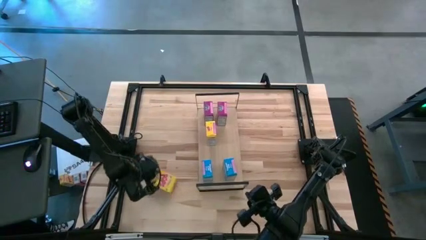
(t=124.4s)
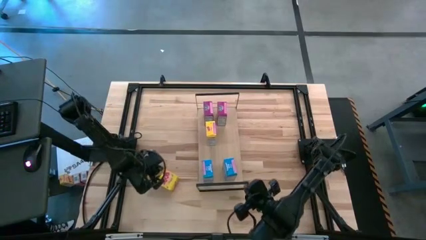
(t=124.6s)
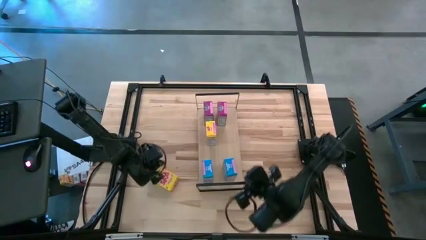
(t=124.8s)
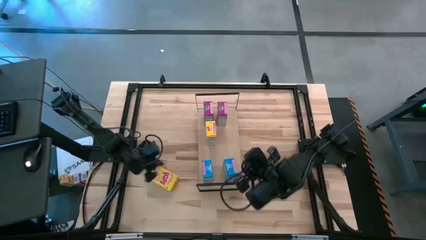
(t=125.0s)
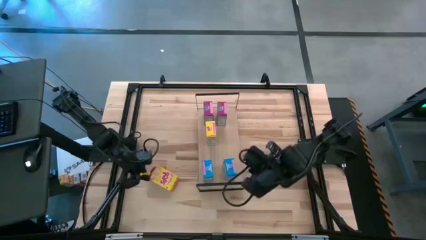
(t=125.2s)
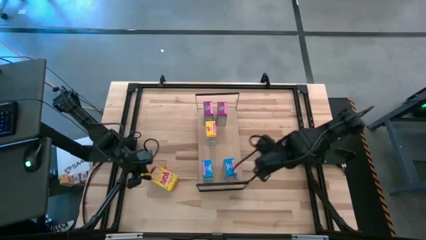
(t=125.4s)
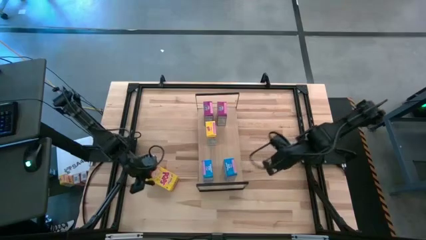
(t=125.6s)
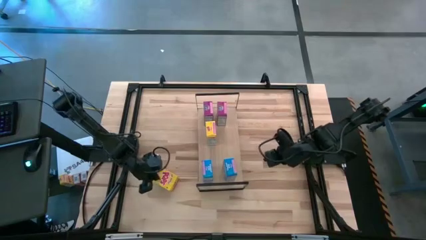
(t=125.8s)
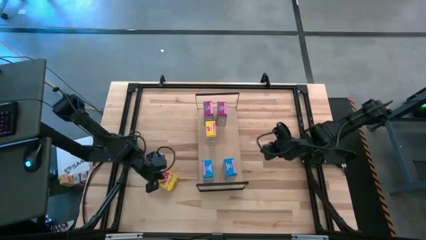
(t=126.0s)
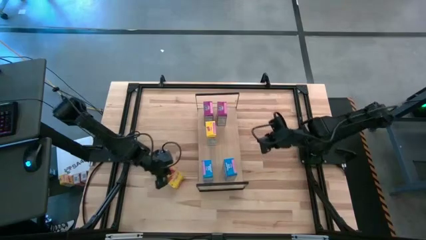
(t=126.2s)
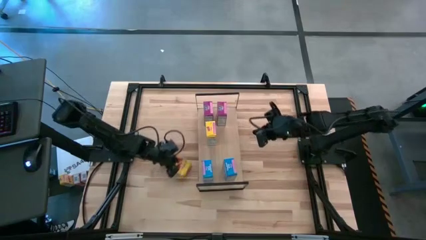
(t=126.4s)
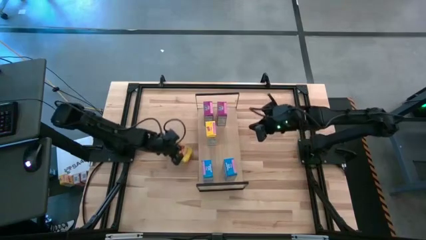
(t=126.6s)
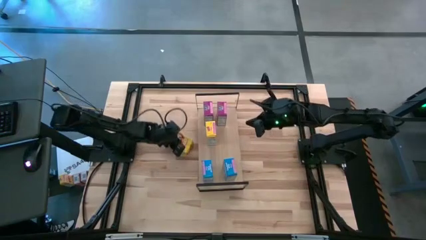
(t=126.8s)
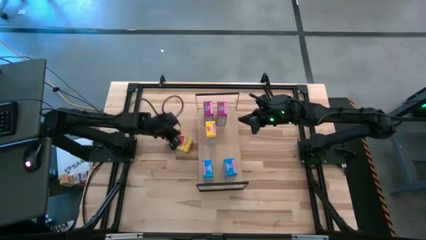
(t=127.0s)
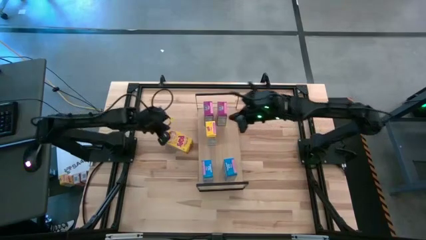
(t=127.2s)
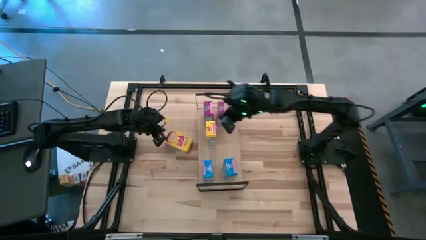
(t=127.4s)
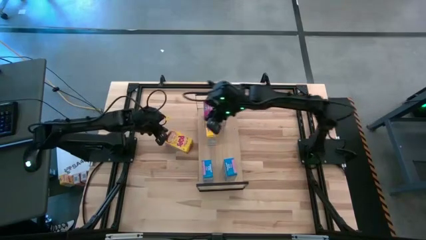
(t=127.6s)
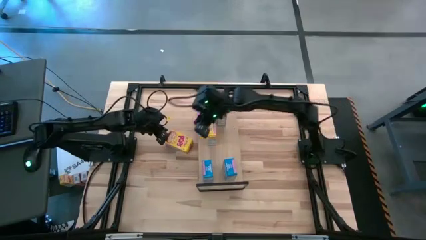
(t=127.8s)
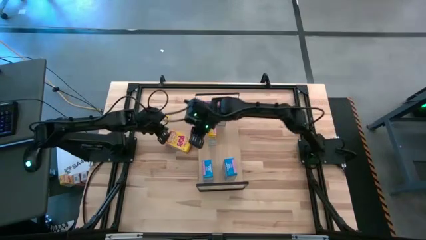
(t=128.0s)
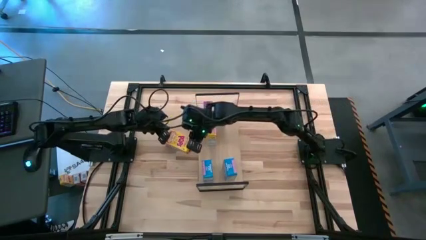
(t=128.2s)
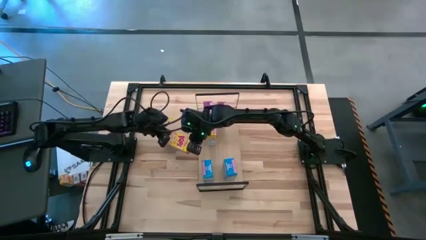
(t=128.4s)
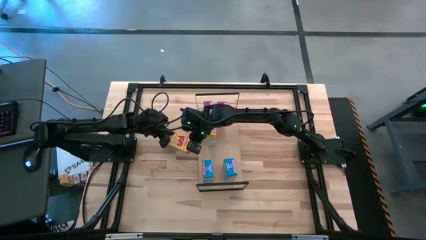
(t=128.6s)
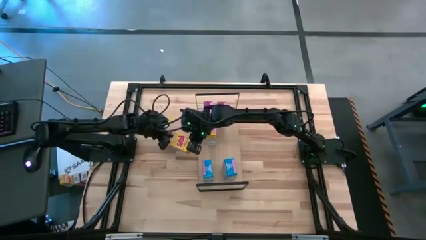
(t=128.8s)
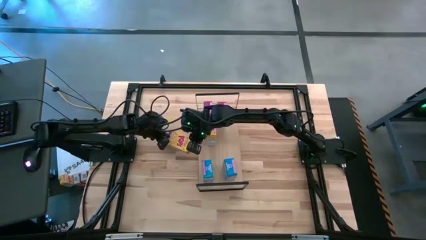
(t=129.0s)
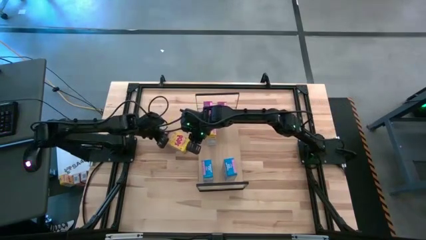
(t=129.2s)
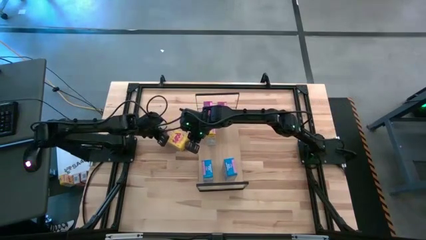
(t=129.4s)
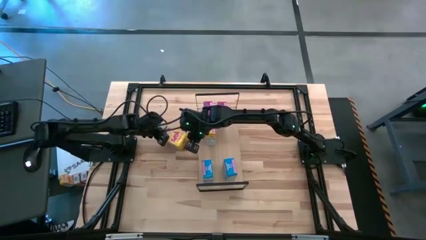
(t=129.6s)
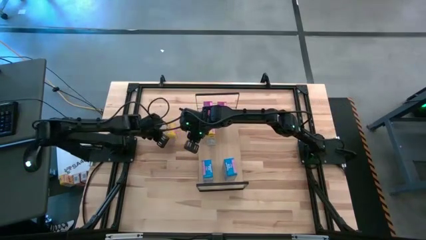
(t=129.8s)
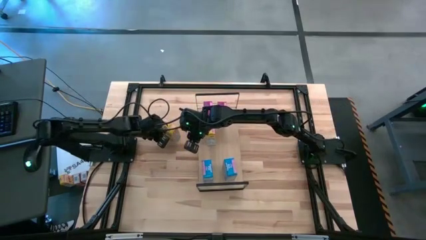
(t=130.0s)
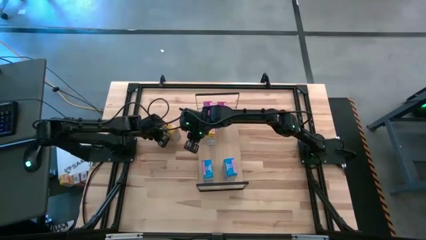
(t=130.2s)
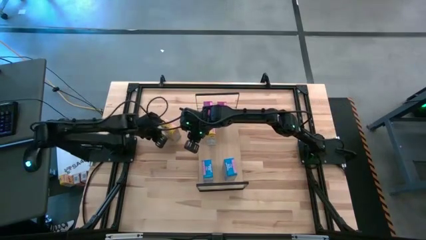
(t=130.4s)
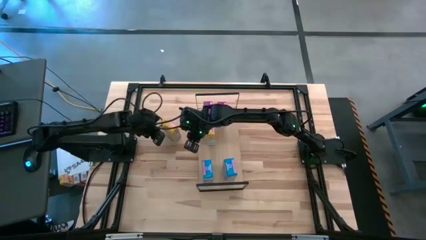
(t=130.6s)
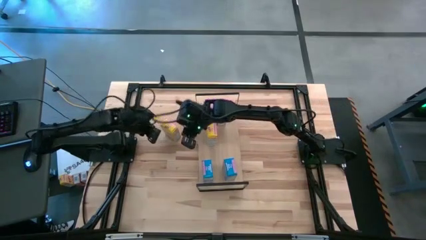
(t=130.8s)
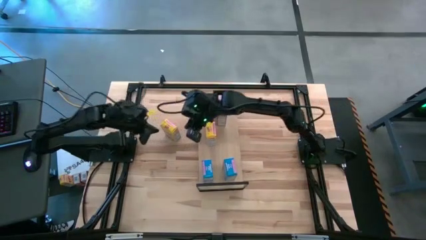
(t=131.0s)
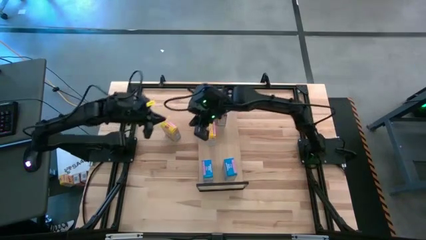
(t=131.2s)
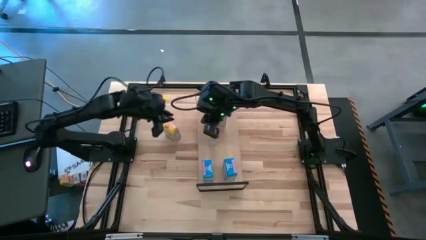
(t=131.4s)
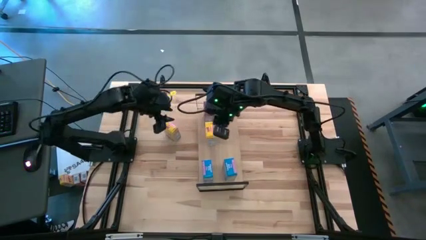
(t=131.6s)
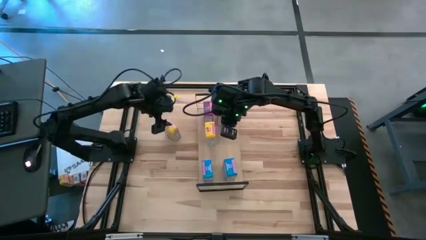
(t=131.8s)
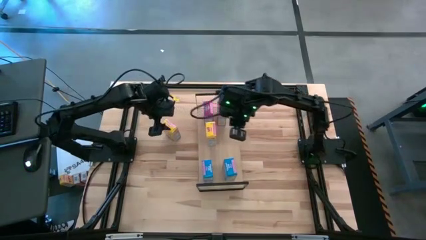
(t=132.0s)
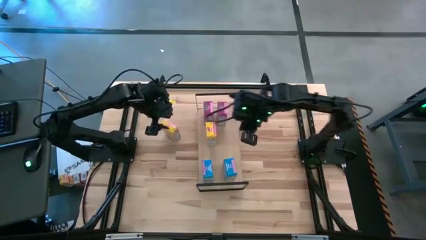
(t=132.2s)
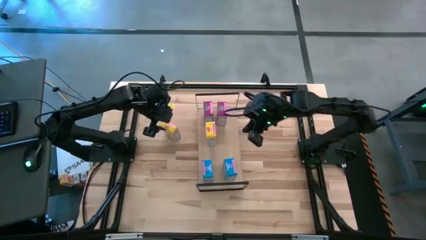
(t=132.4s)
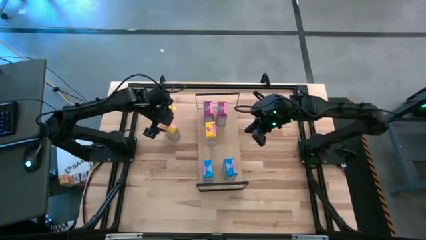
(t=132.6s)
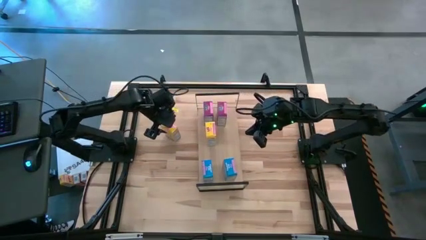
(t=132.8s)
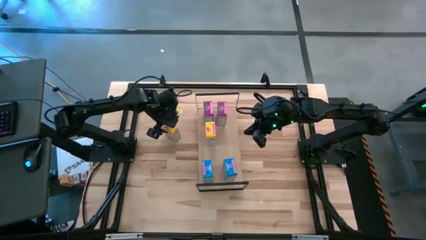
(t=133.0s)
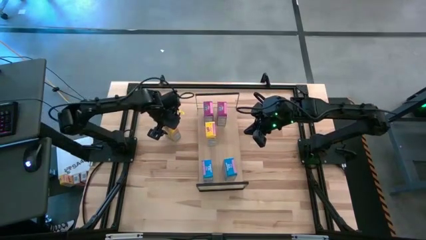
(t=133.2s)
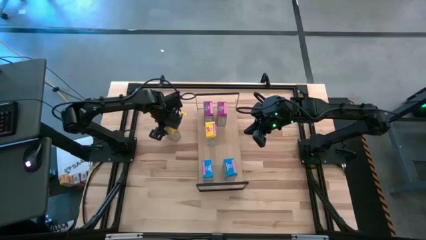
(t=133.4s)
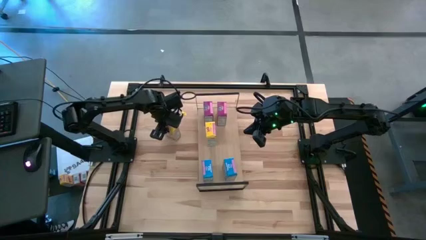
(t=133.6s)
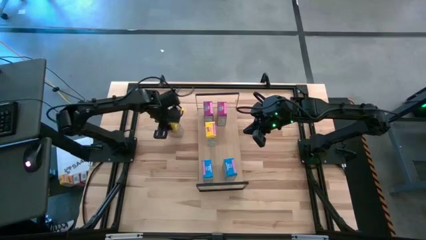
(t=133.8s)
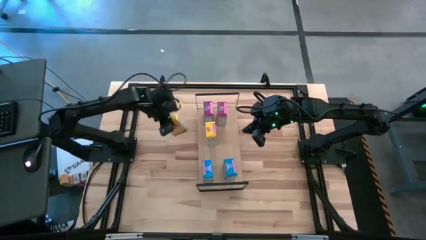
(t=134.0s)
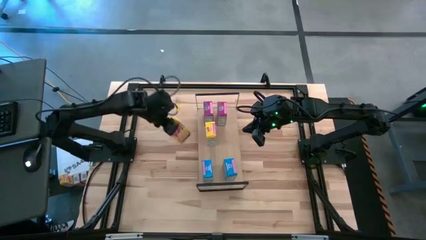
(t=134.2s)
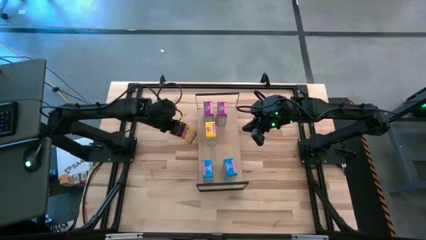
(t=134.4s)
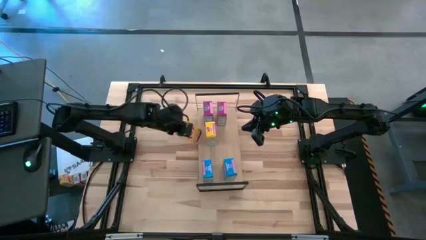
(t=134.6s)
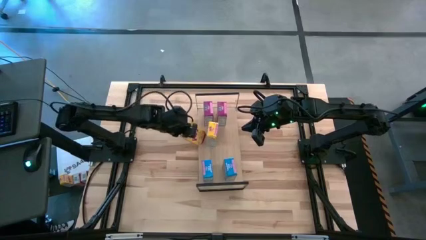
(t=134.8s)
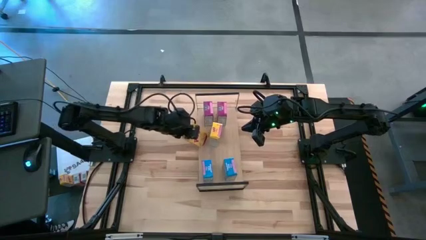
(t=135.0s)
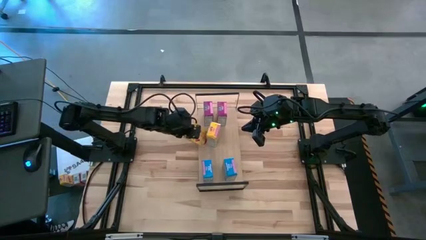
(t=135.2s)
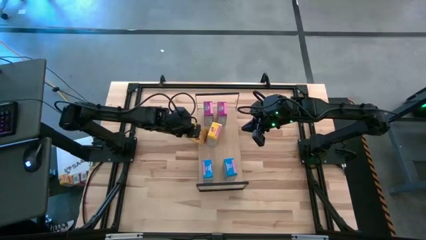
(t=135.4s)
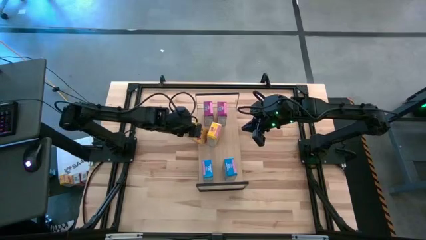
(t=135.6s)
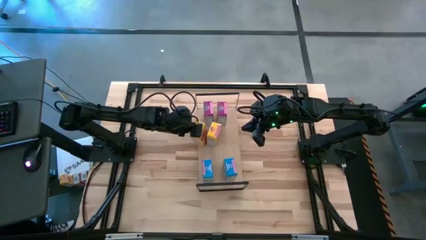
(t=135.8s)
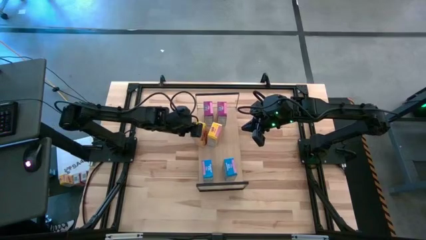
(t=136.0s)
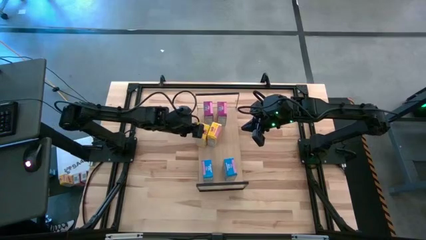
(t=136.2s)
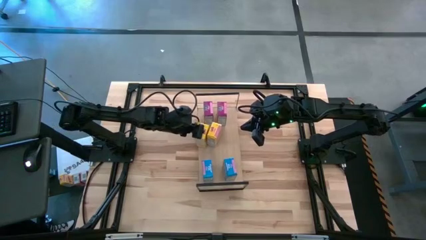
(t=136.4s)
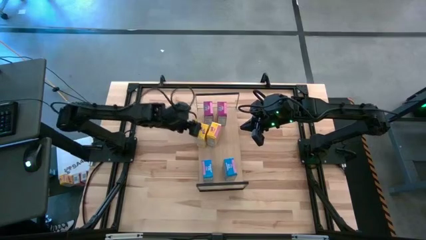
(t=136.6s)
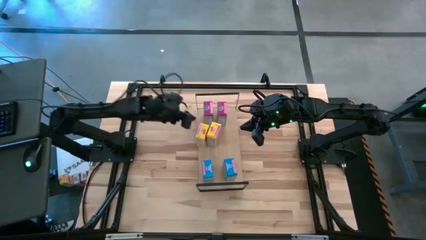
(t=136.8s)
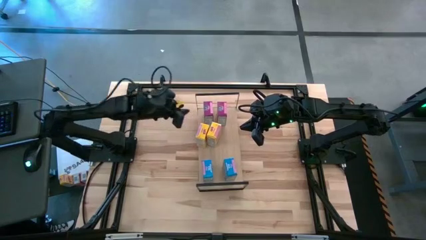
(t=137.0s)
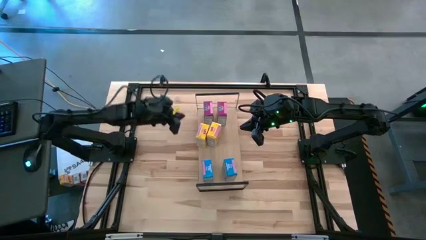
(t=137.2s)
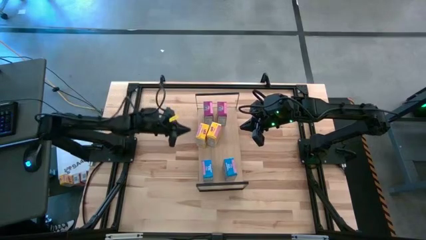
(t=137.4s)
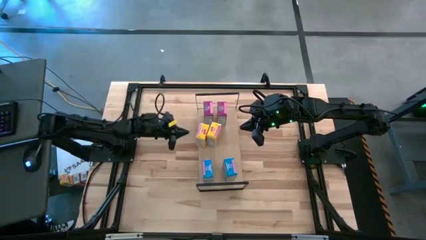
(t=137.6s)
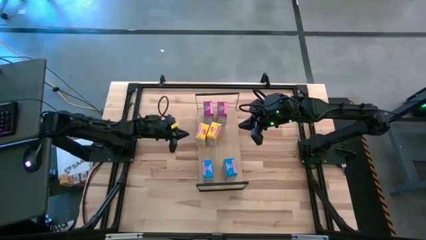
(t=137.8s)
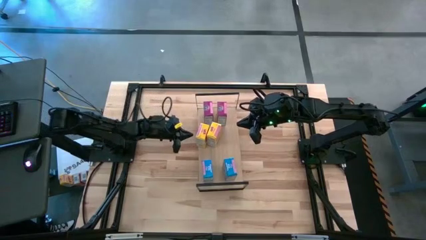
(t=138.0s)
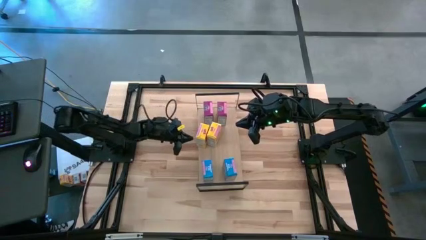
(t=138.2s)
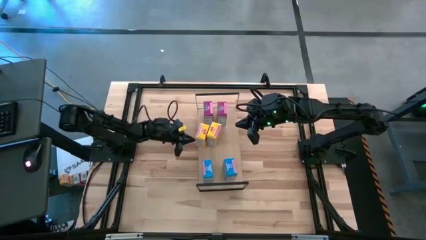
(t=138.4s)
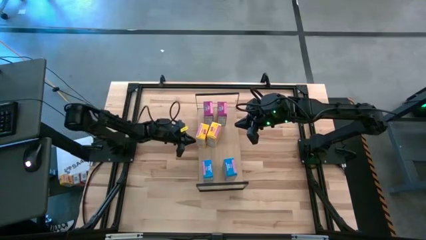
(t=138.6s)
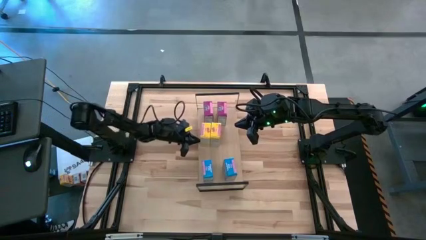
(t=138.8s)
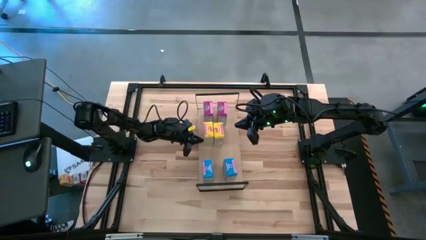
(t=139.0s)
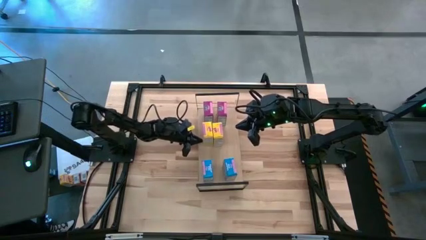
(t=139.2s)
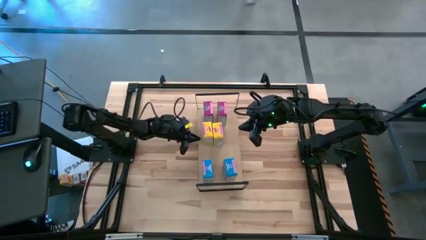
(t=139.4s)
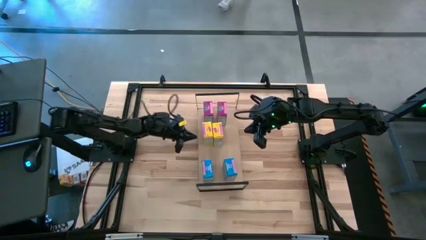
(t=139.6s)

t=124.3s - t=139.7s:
Task: Stack cereal on shelf
Put the yellow cereal box on the shelf aligned with the other yellow cereal box
